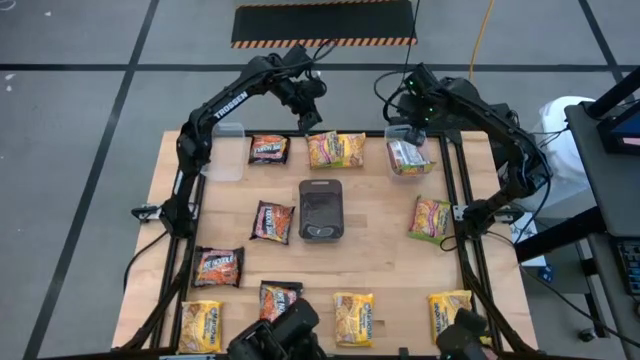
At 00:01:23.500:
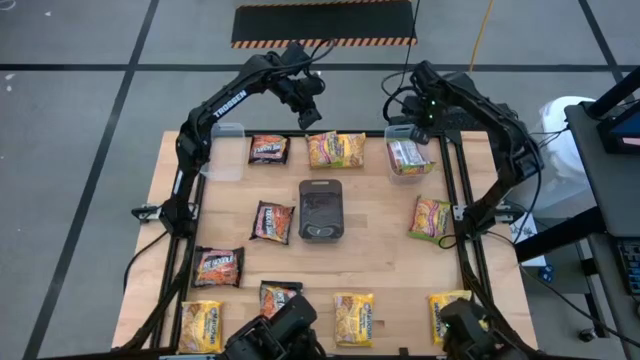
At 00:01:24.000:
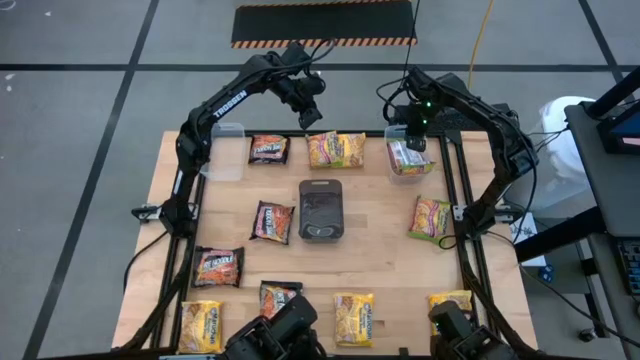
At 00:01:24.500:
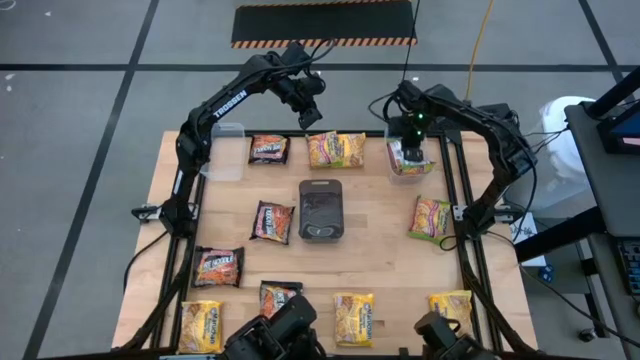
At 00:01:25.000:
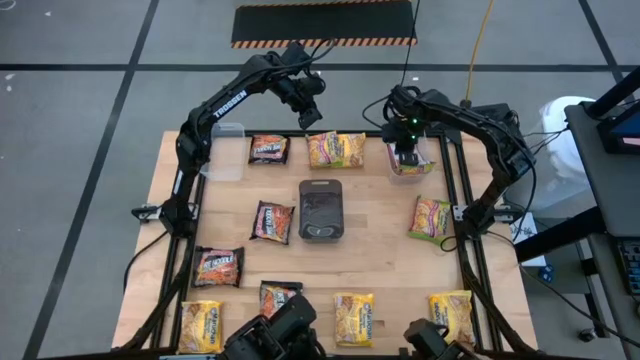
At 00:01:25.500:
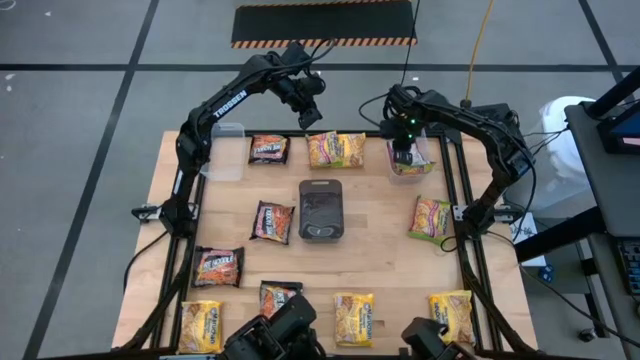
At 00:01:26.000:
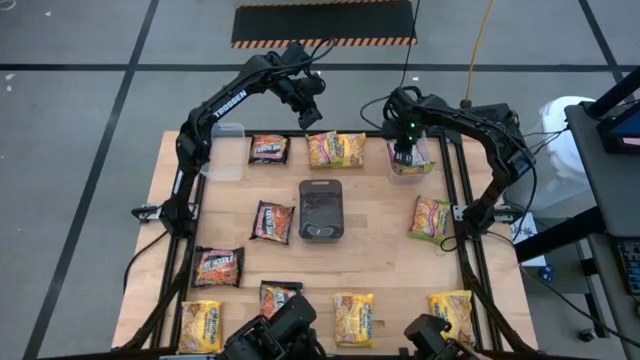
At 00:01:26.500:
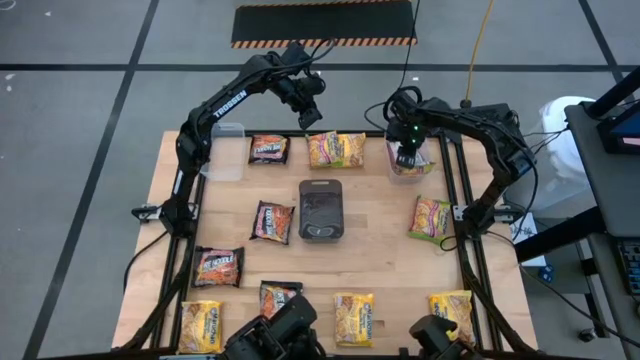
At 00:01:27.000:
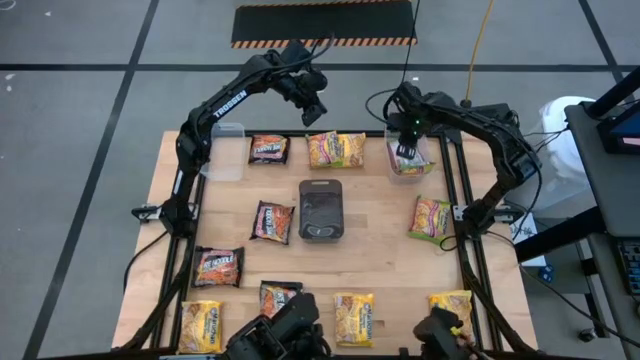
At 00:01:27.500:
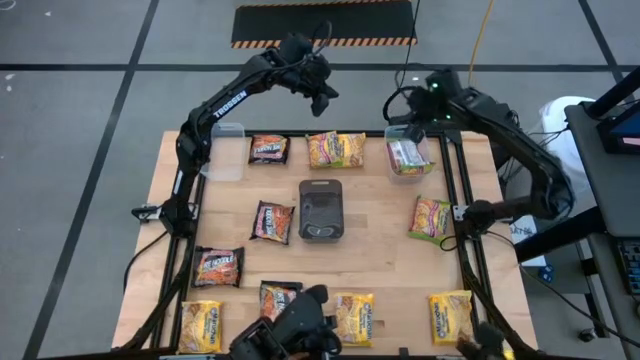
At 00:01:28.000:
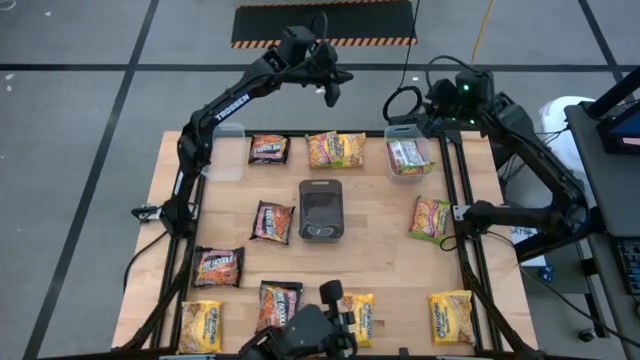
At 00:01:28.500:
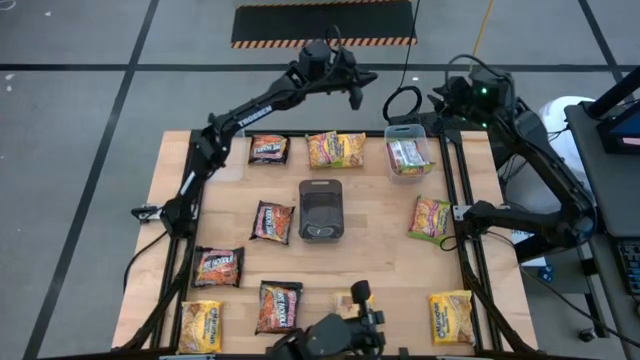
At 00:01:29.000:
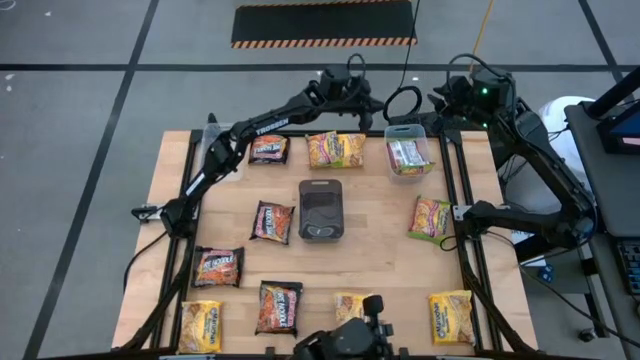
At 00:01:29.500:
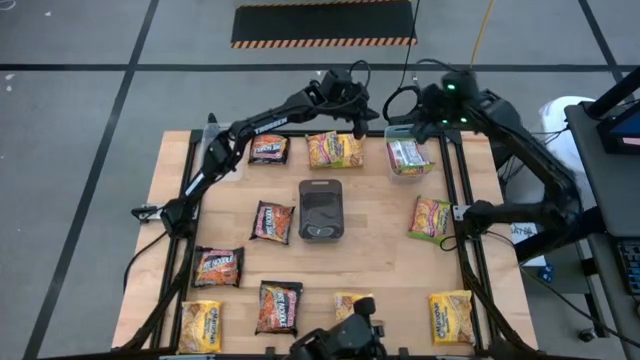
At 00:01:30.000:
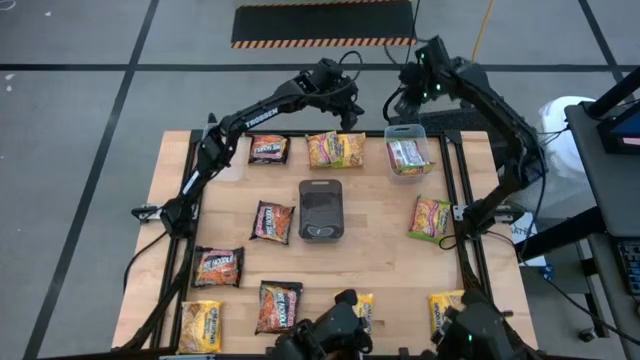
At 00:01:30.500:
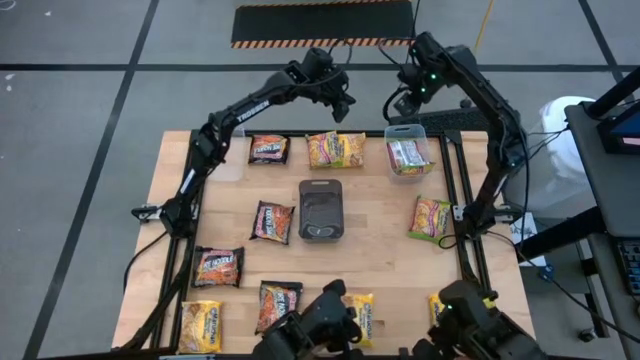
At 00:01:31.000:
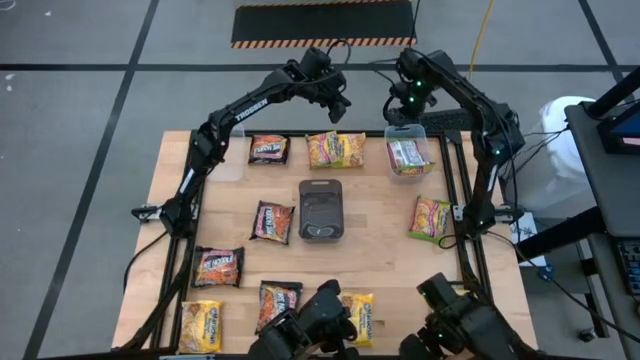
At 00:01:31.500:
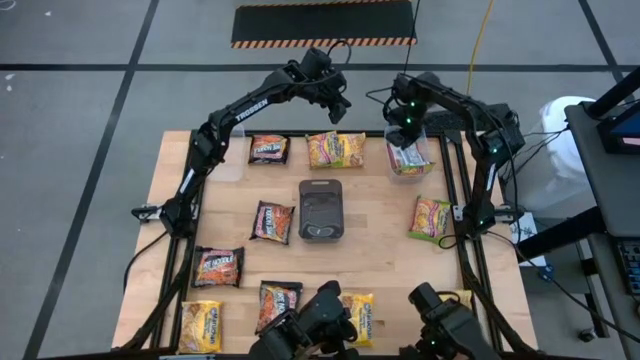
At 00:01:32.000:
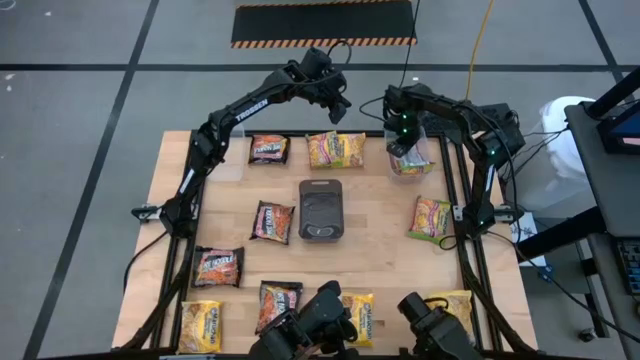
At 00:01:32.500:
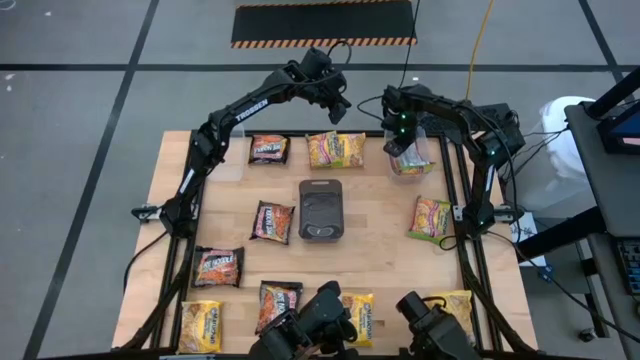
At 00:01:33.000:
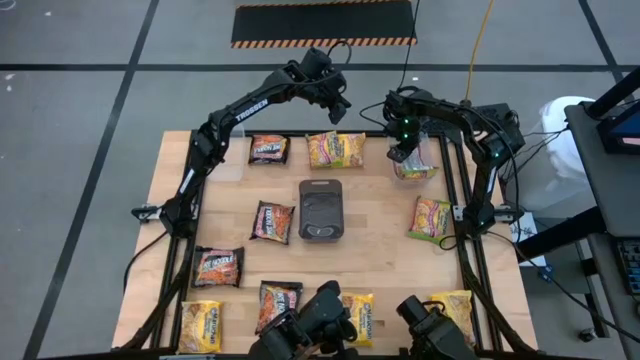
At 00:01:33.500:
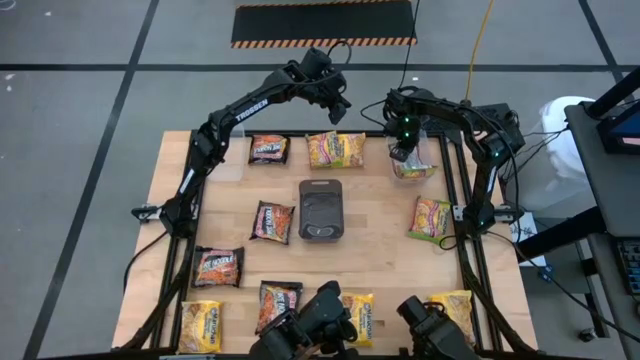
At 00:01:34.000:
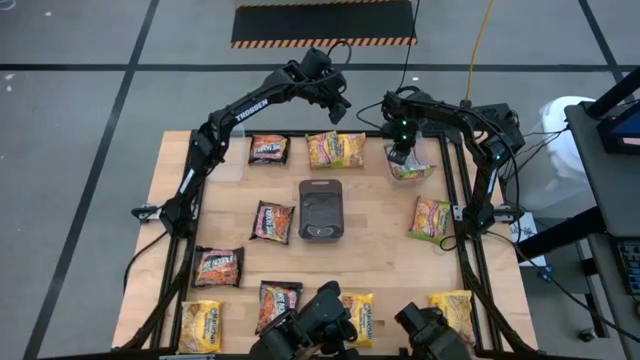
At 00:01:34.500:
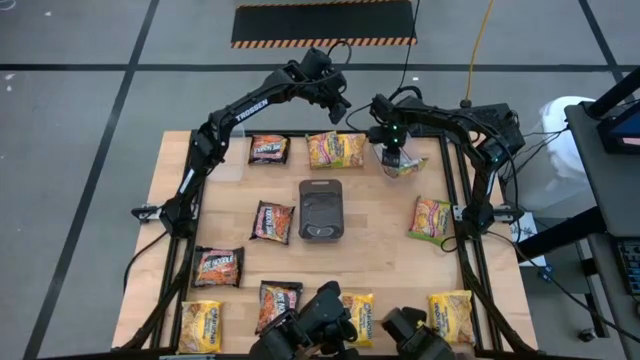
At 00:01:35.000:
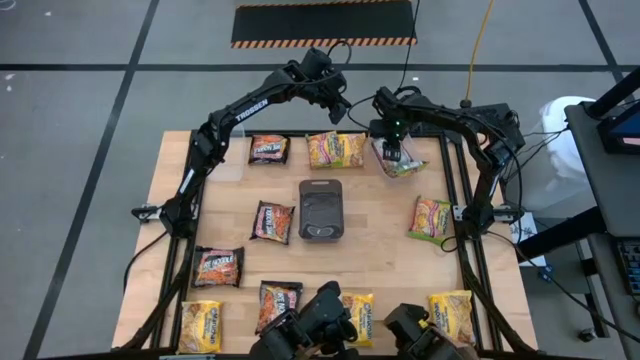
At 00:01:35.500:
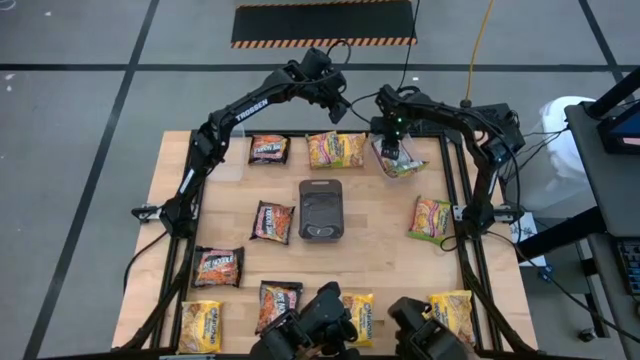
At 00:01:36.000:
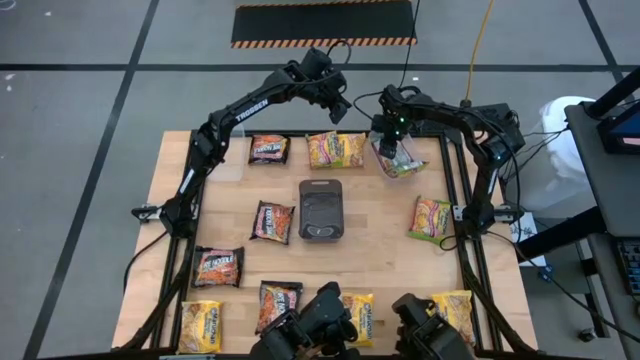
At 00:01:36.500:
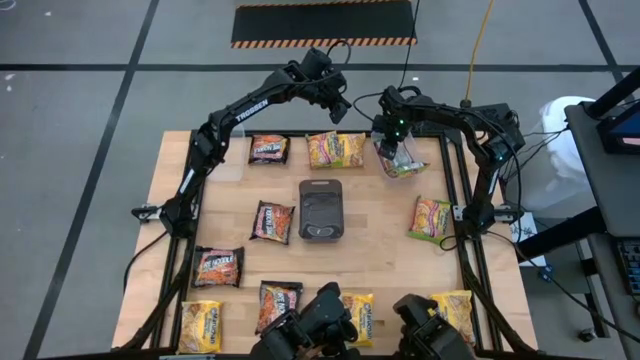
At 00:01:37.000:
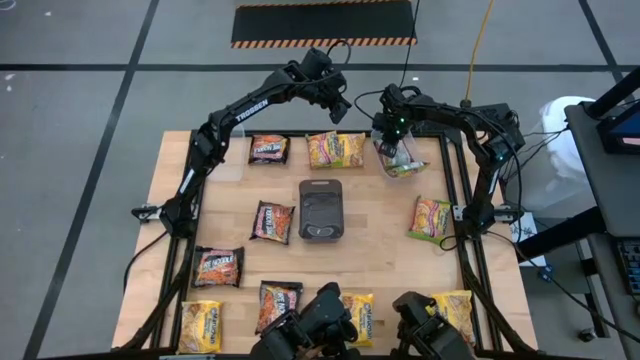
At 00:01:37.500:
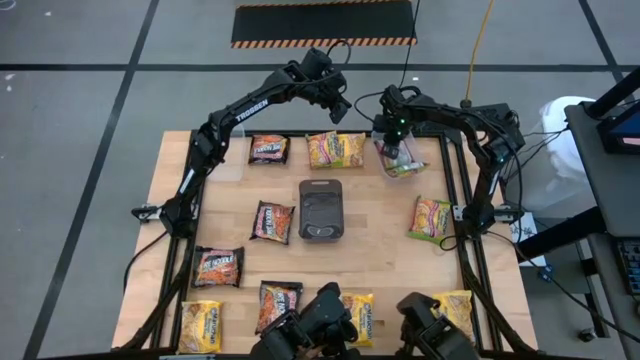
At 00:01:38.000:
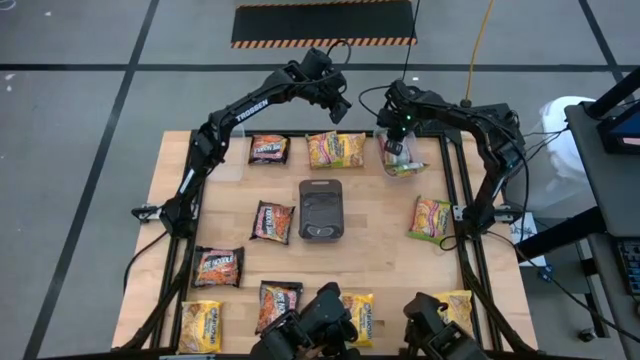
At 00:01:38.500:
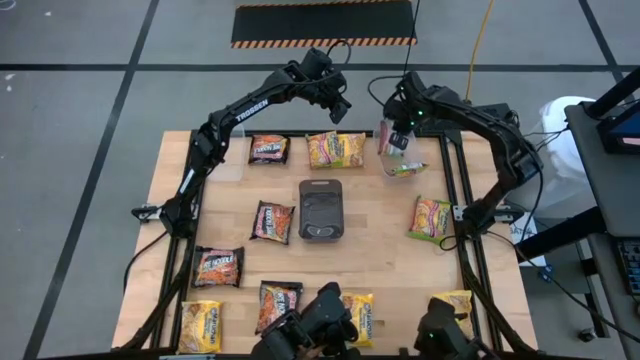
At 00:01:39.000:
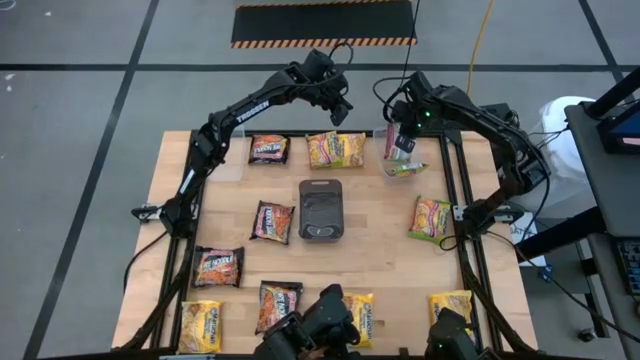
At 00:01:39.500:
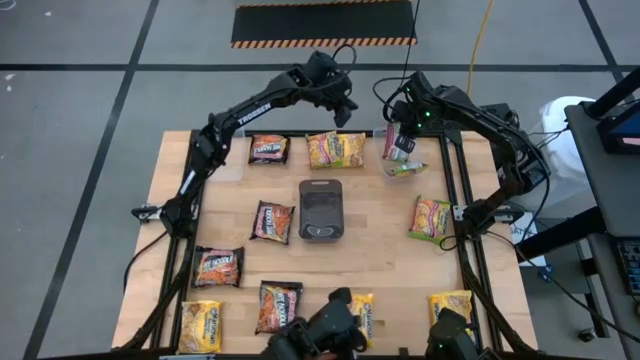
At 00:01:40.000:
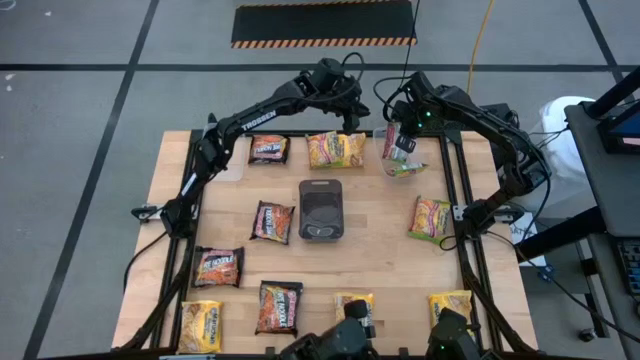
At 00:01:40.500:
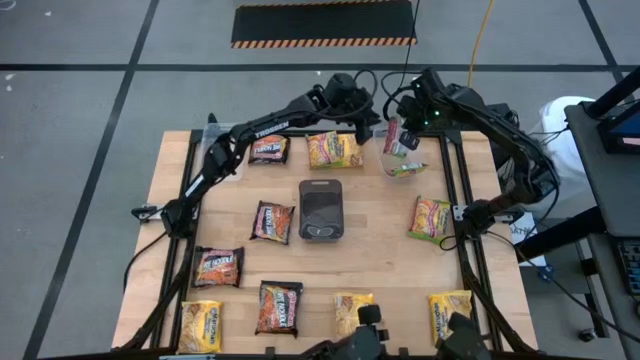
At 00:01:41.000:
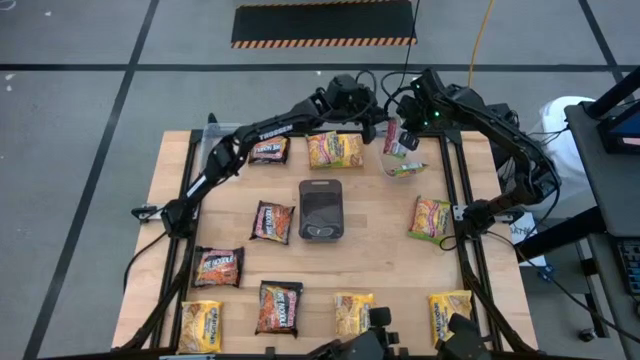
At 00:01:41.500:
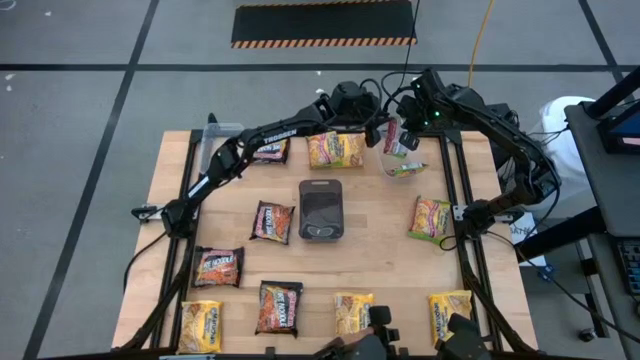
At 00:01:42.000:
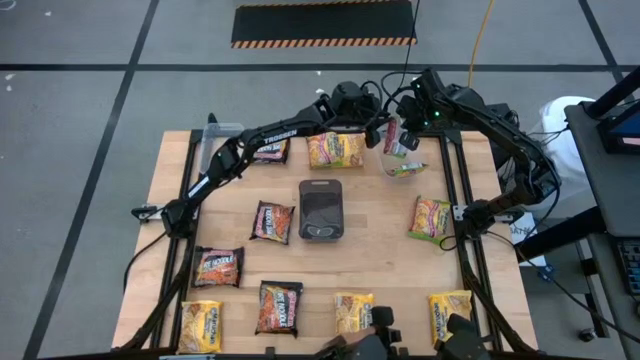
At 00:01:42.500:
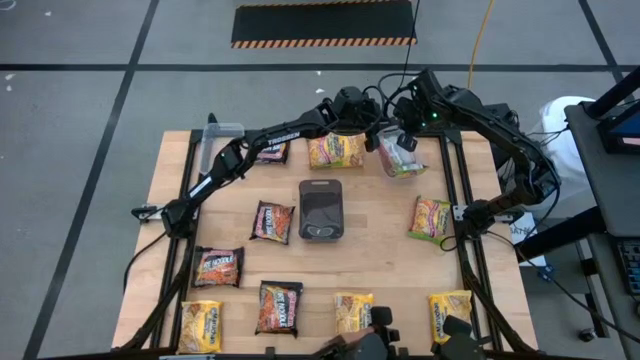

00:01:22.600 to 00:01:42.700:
Task: Sort Maruchan noodles
Adjust the green noodle pack
